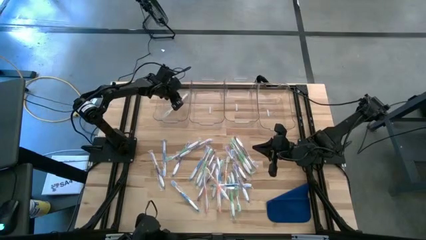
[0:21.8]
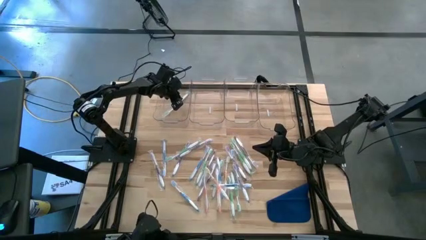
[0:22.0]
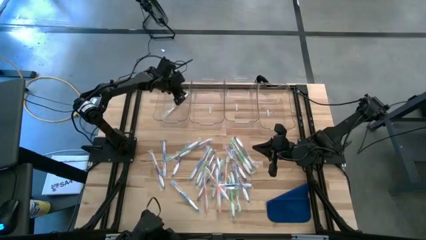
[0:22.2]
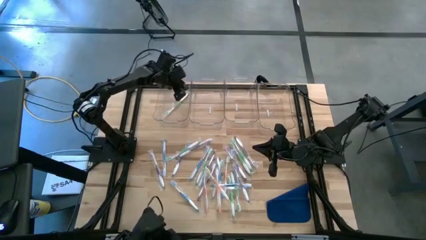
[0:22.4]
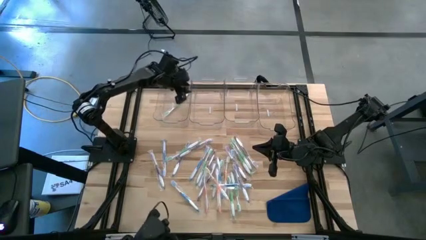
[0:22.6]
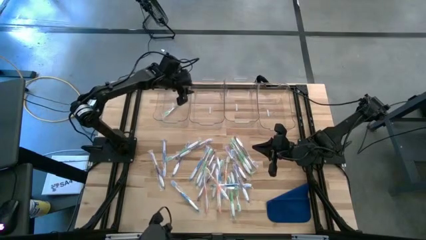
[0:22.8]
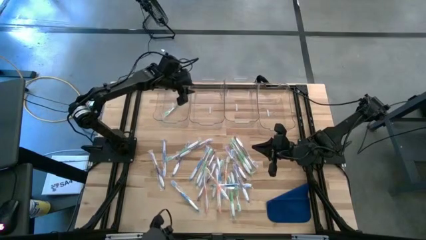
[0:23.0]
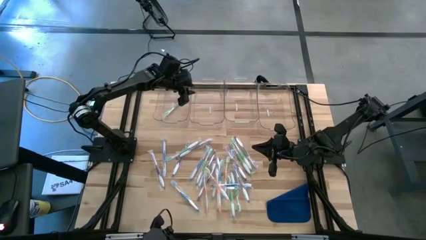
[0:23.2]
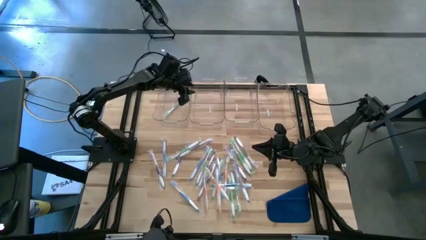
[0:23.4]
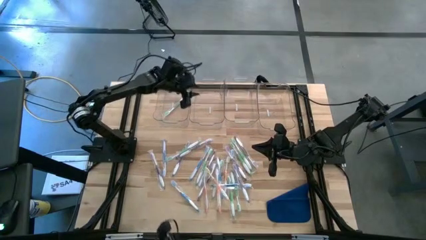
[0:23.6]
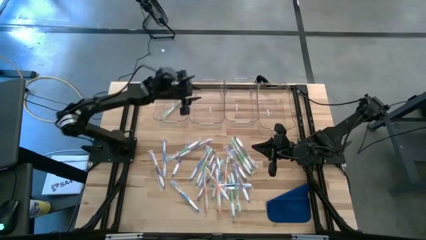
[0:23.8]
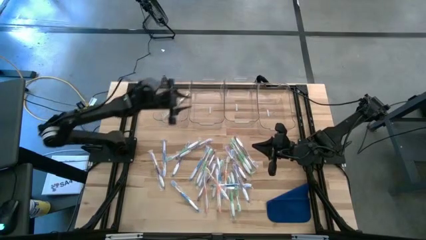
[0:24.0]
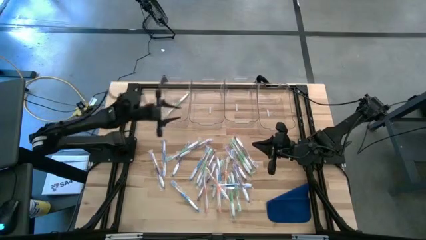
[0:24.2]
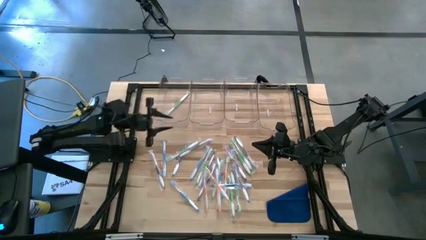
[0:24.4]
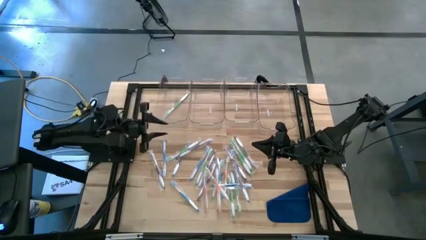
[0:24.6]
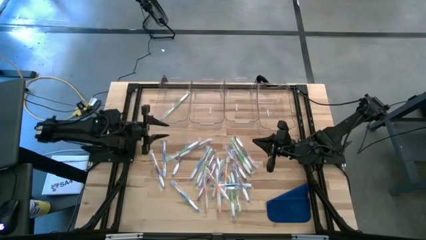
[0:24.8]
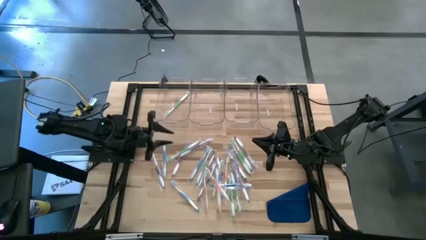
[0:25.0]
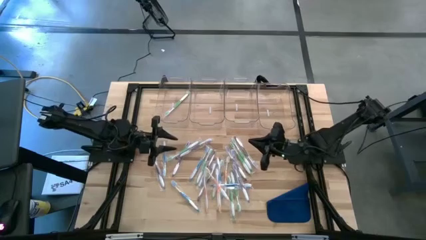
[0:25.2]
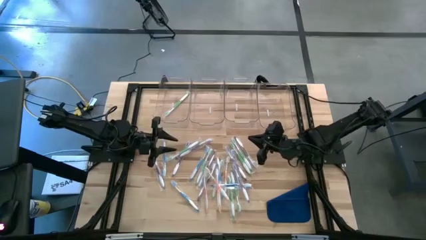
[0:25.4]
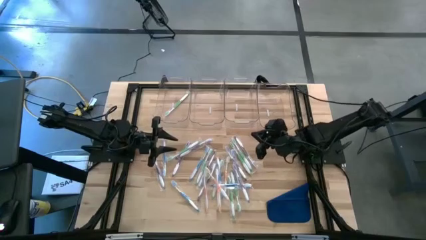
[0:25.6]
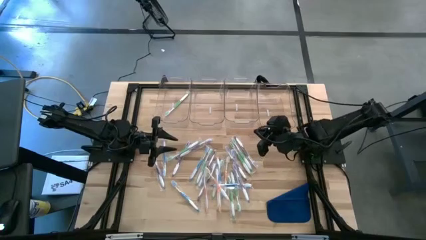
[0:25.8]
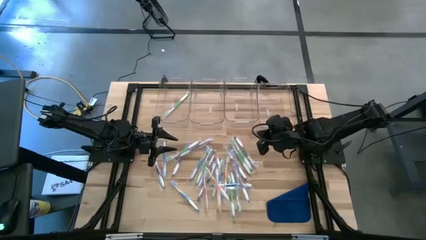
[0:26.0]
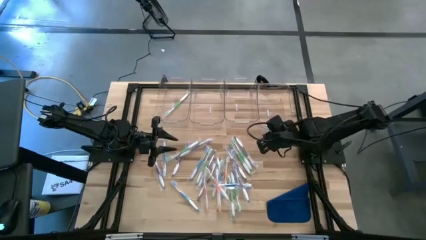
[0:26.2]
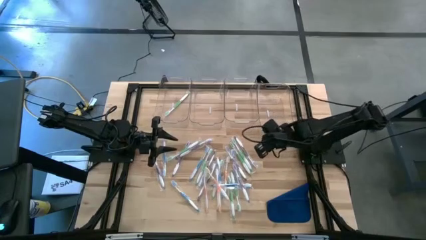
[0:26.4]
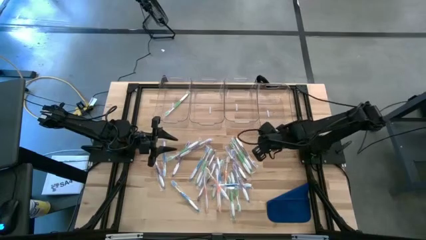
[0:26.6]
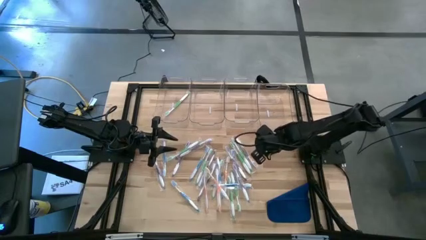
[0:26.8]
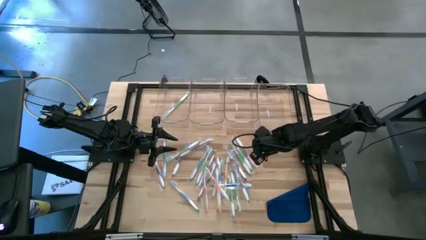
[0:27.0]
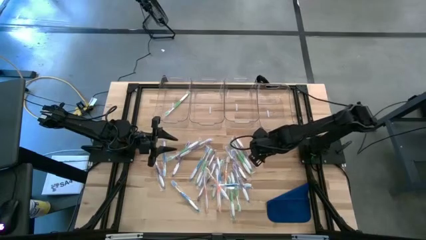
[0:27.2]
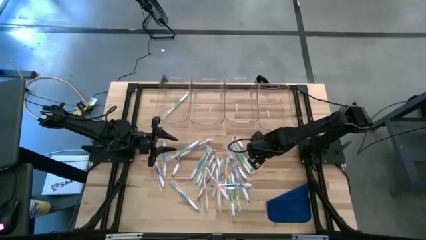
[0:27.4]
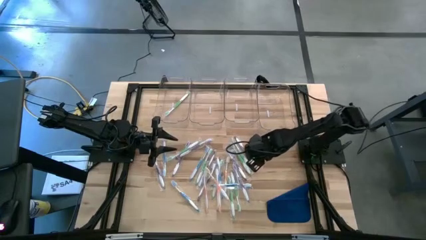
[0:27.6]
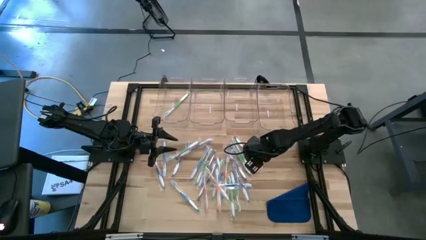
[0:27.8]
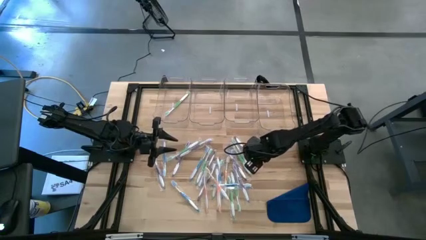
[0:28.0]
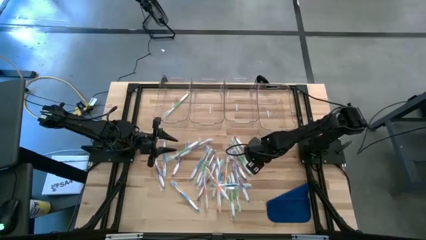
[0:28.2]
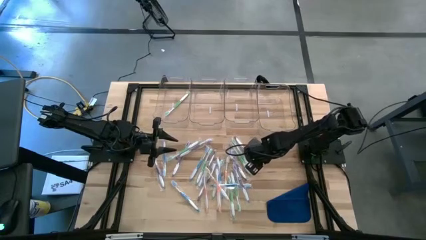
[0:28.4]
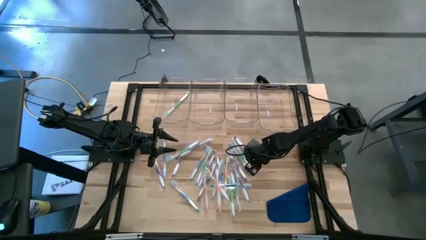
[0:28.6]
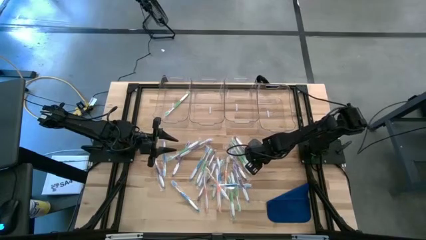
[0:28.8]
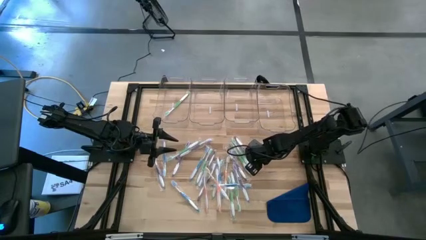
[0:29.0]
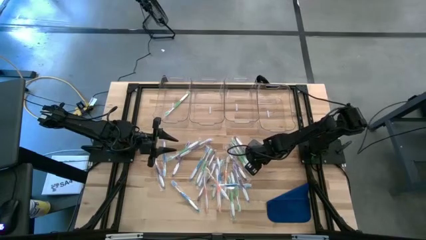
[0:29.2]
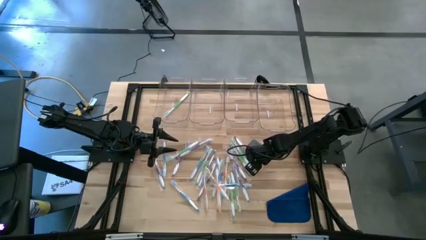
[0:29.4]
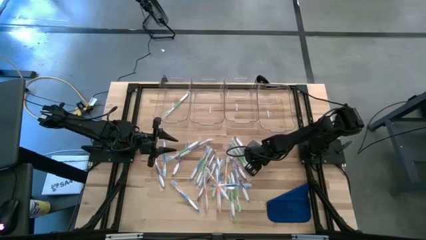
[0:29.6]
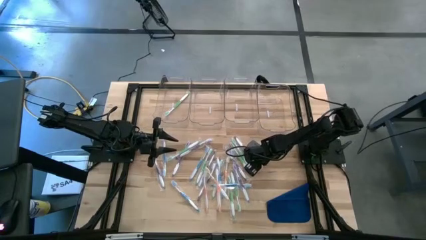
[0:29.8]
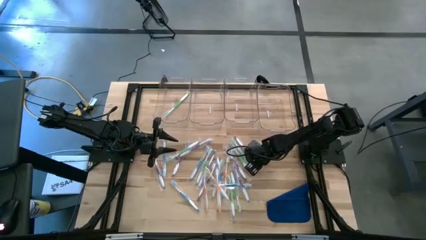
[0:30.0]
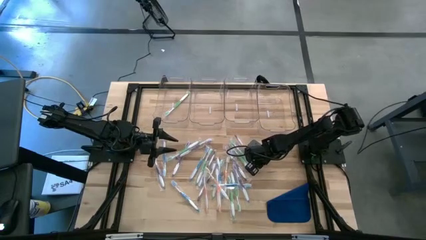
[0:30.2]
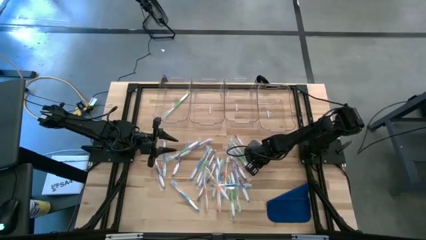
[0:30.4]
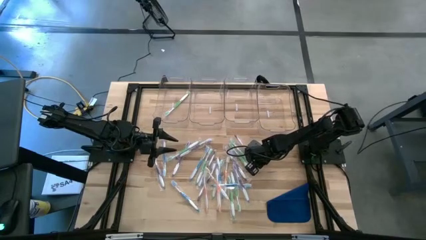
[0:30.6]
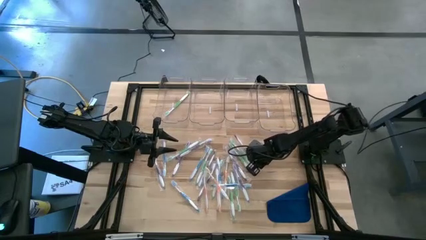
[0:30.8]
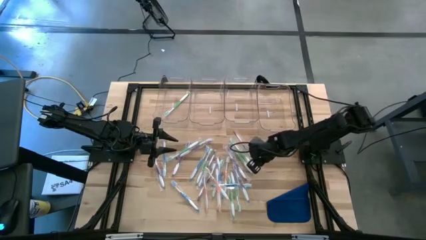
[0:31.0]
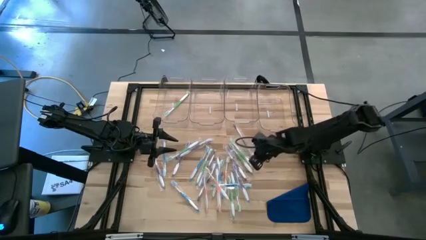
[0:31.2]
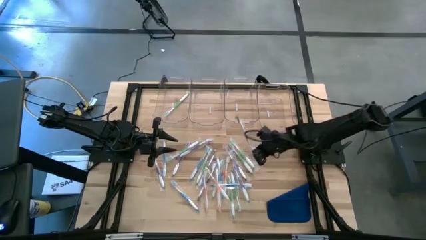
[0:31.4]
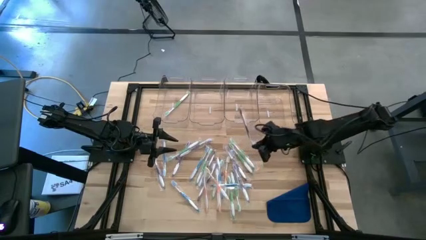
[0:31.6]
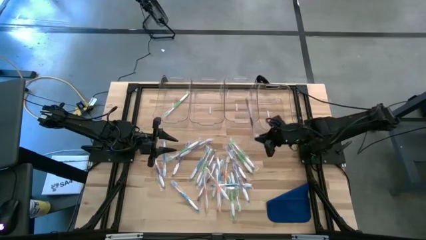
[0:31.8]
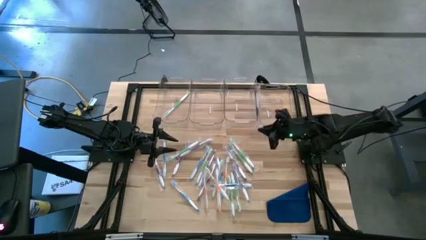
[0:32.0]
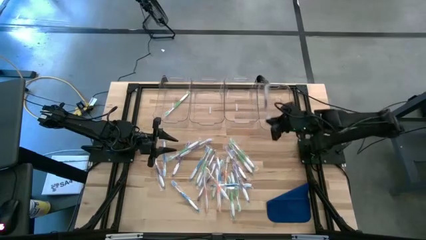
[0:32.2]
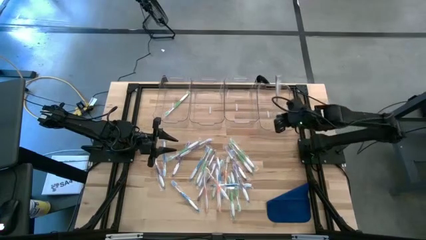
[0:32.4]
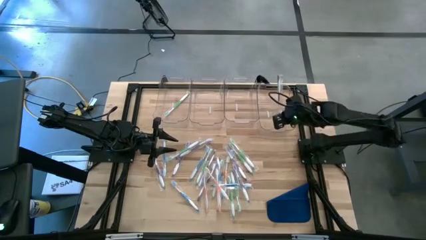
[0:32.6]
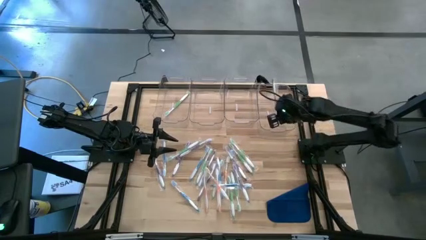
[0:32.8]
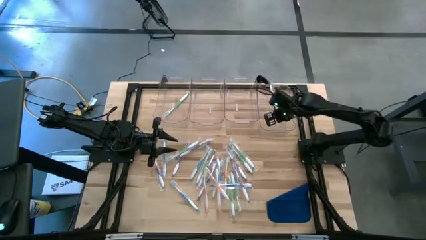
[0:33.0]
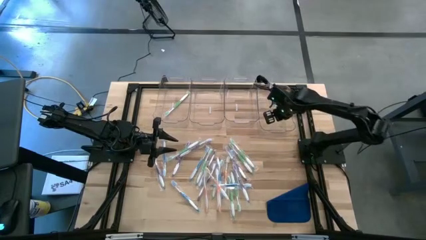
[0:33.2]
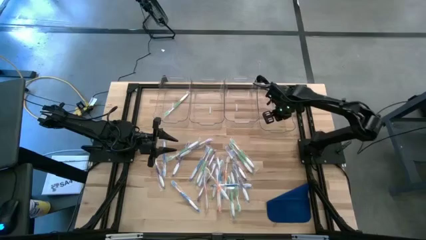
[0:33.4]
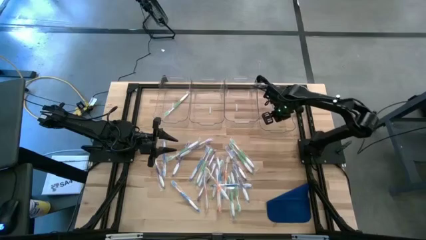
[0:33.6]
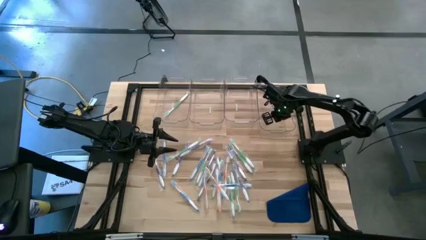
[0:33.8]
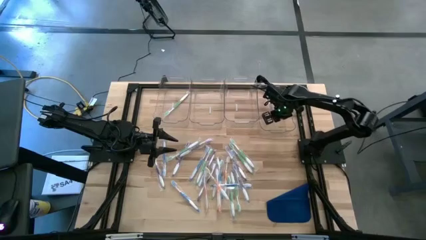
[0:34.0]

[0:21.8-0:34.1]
Task: Pick & Place Toothbrushes
Put the violet toothbrush into the right transparent bin

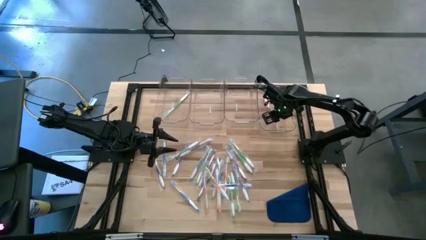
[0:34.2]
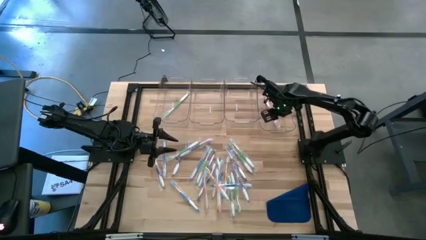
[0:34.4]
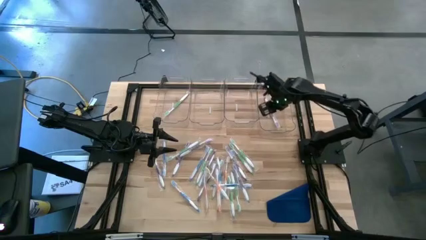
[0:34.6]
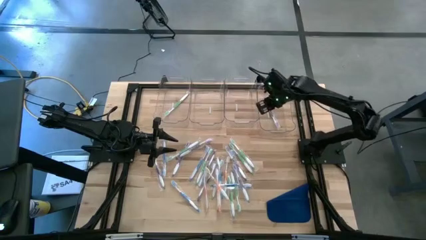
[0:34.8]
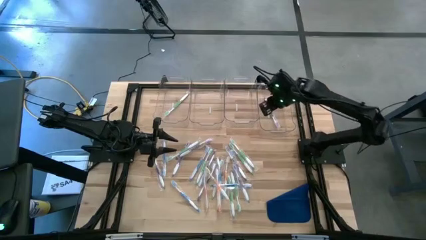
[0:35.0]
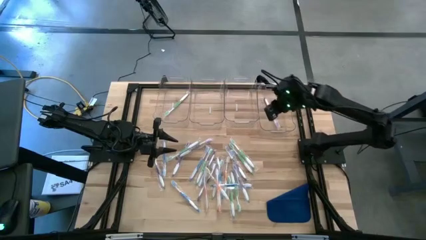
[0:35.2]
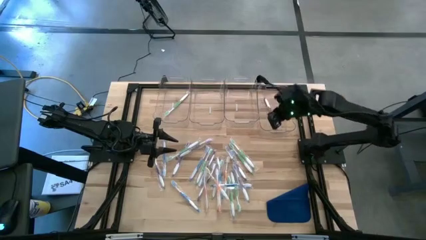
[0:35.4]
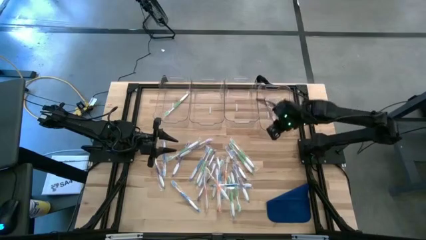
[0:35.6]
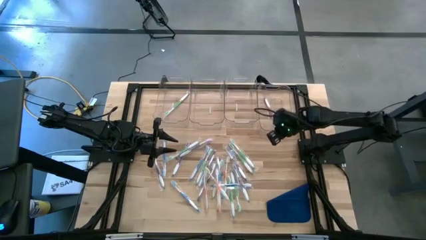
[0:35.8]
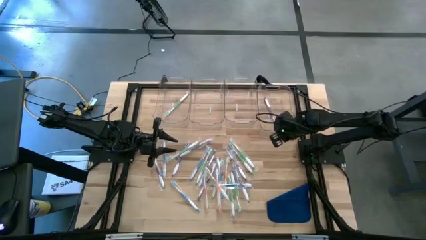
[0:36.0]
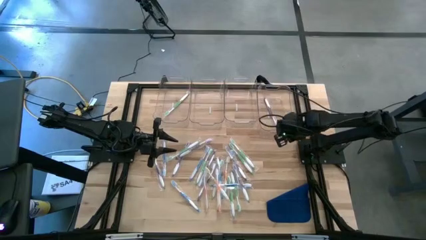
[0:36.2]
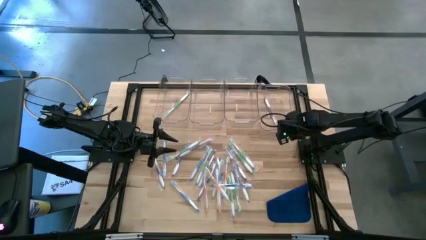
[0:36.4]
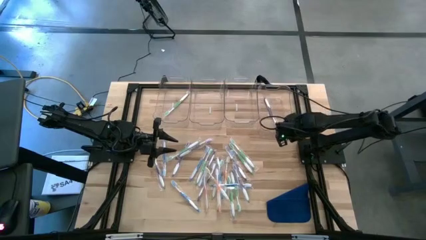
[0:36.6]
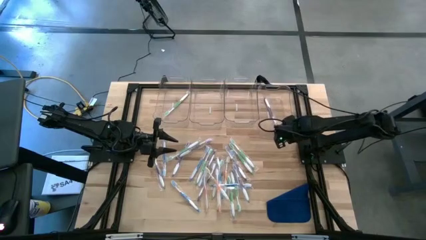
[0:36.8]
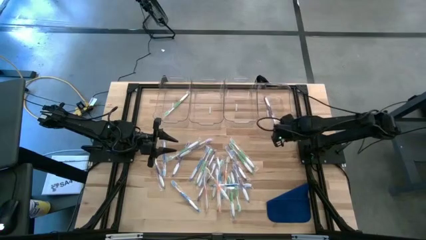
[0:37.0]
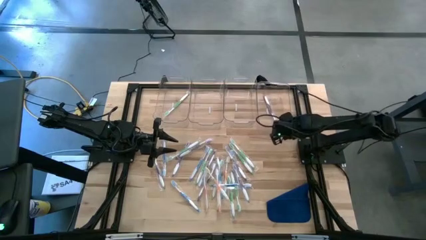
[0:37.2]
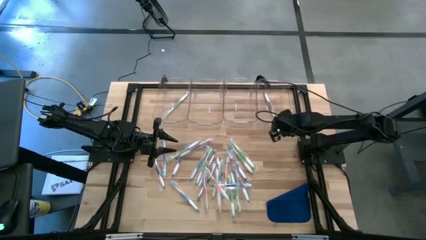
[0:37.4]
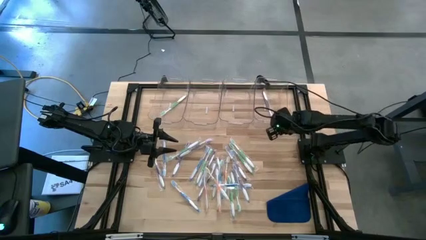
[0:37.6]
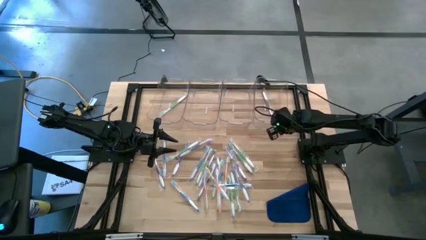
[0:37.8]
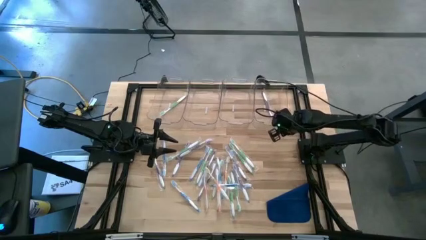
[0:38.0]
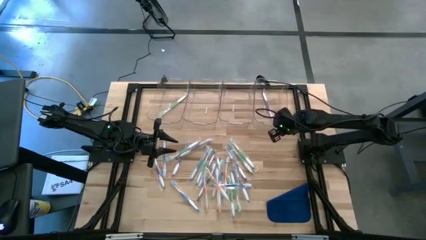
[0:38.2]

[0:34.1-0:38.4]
Adjust the right transparent bin

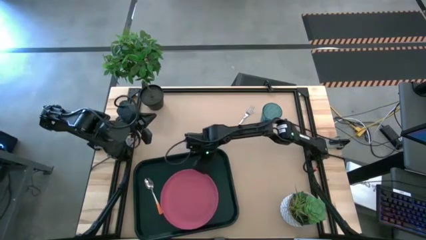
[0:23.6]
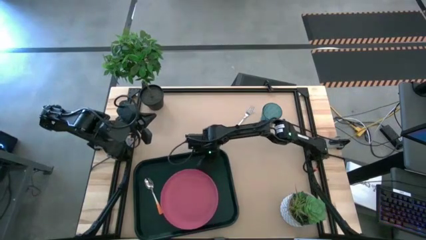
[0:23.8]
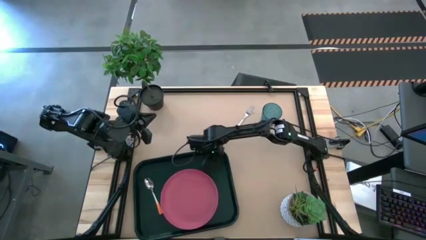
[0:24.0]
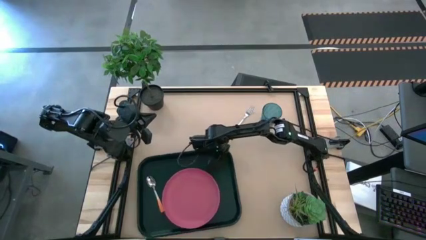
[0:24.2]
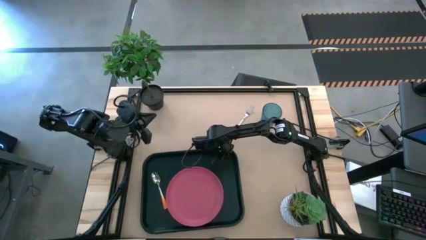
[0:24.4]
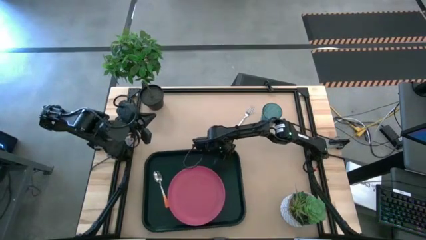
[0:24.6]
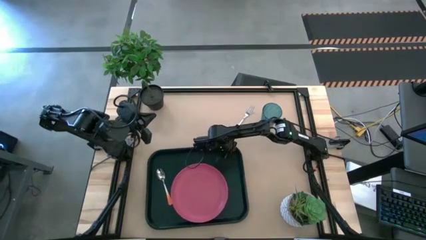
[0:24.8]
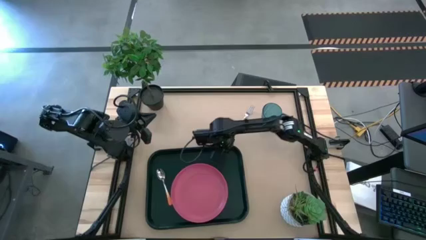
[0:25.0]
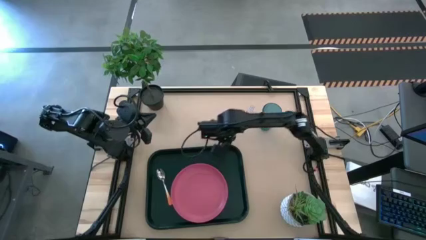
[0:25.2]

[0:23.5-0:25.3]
Task: Pick and place plate/cup/fork/spoon on tray
Adjust the black tray

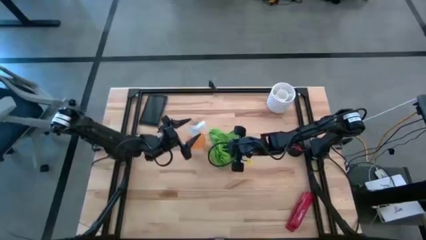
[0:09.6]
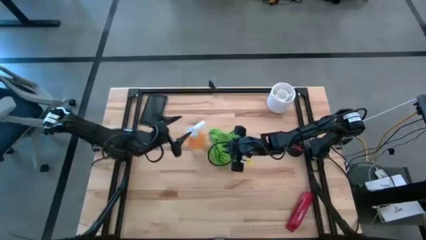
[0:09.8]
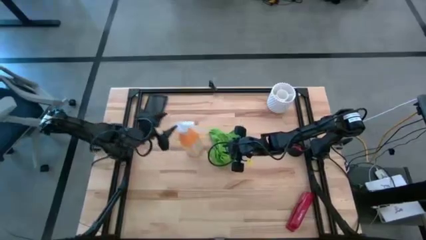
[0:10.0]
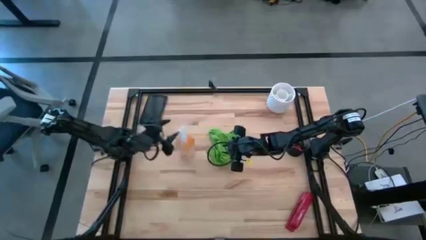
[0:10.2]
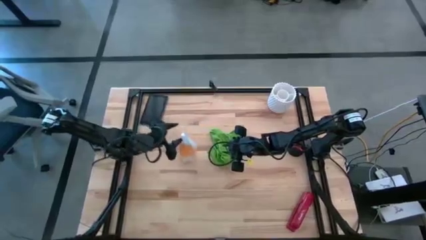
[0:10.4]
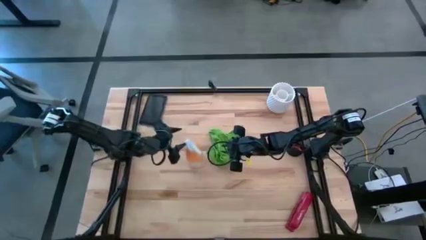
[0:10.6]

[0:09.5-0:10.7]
Task: Apply microfiber cloth
Prepare the spray cleaning bottle
